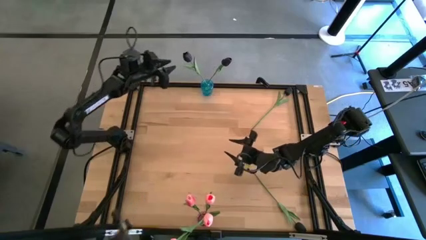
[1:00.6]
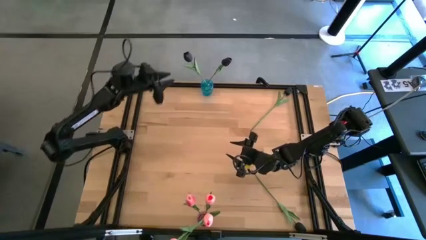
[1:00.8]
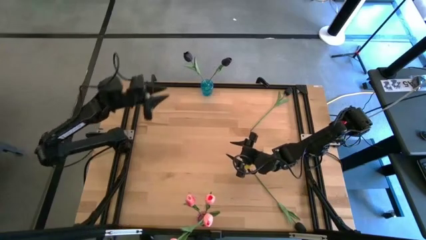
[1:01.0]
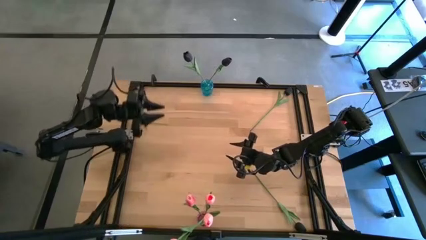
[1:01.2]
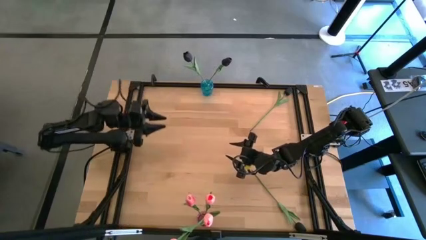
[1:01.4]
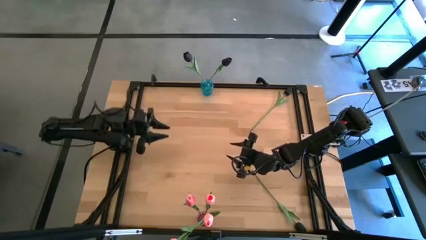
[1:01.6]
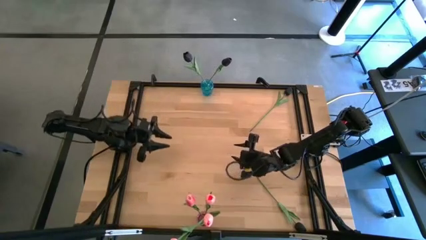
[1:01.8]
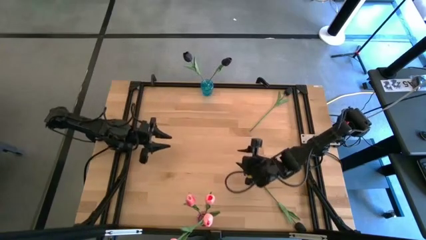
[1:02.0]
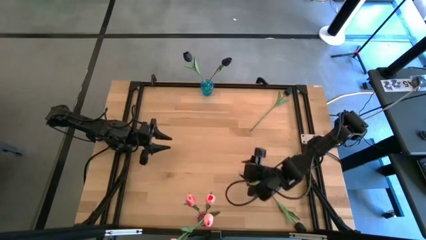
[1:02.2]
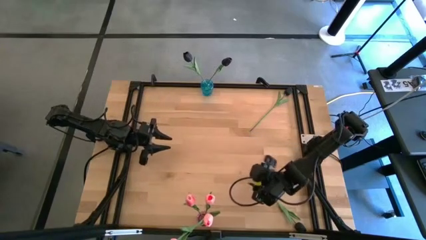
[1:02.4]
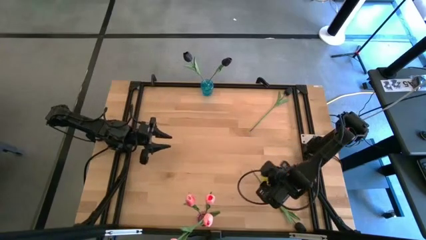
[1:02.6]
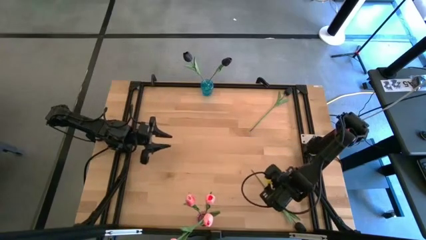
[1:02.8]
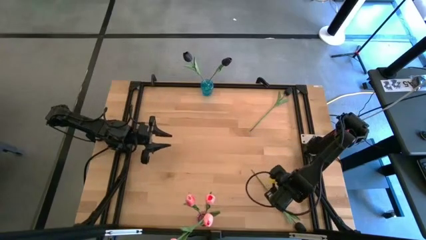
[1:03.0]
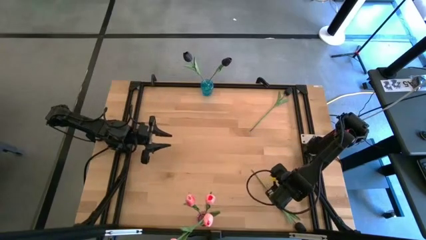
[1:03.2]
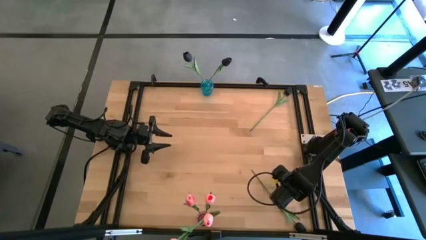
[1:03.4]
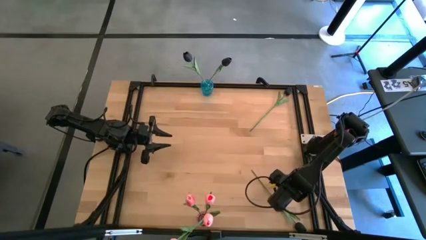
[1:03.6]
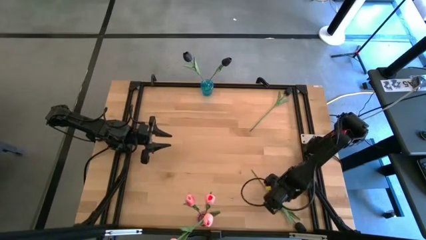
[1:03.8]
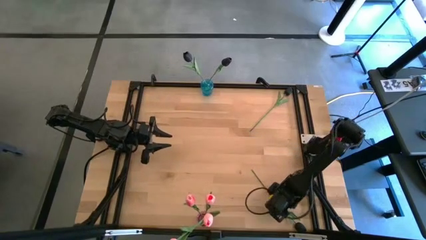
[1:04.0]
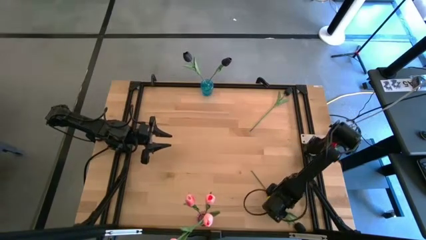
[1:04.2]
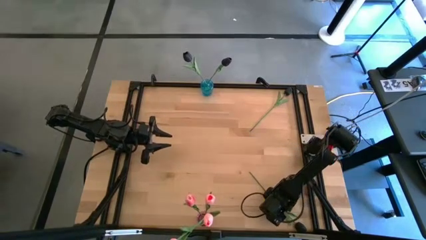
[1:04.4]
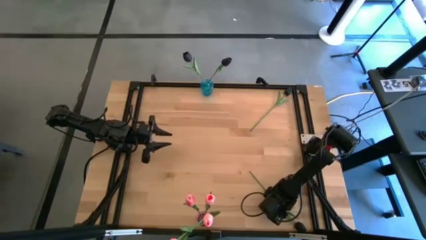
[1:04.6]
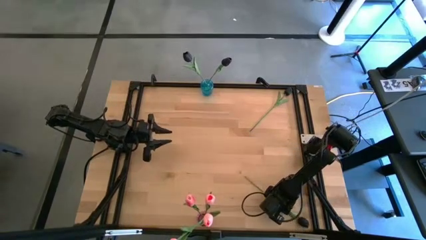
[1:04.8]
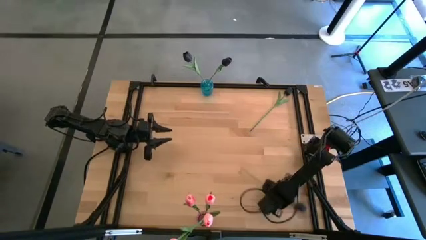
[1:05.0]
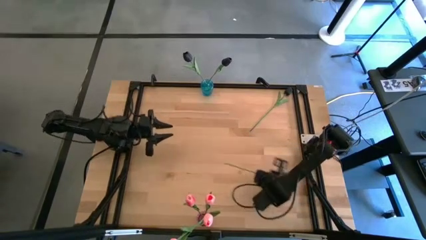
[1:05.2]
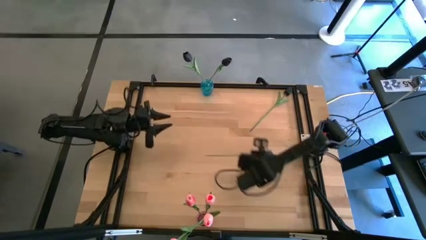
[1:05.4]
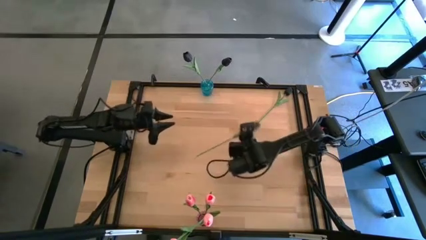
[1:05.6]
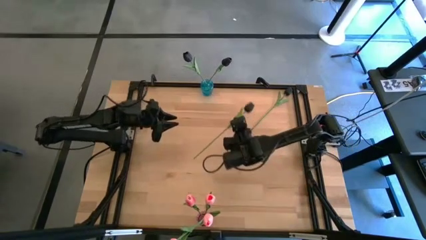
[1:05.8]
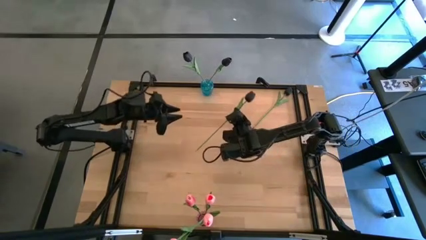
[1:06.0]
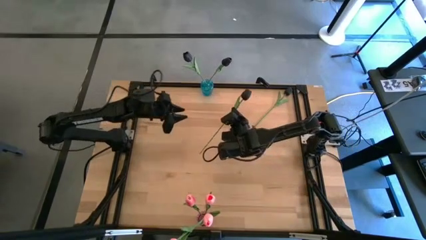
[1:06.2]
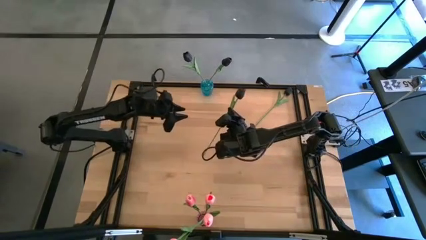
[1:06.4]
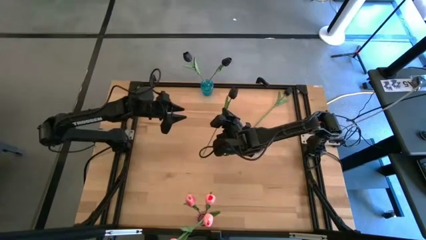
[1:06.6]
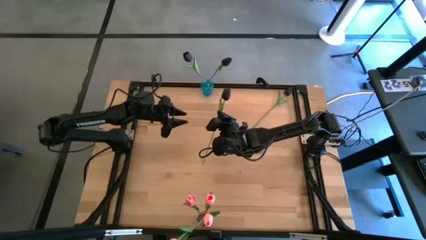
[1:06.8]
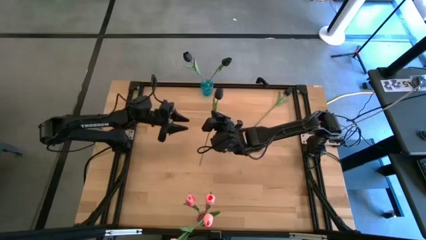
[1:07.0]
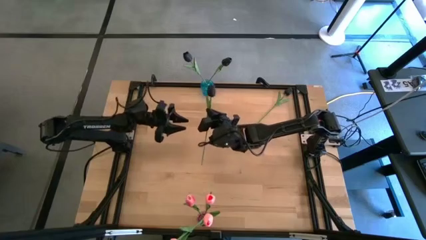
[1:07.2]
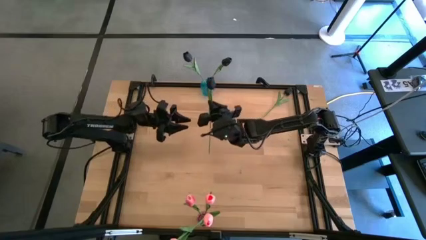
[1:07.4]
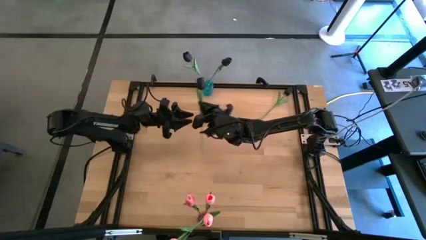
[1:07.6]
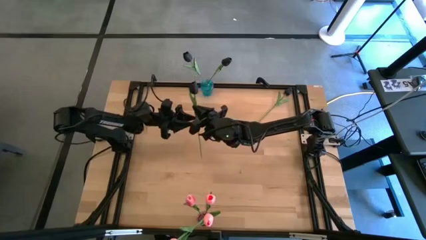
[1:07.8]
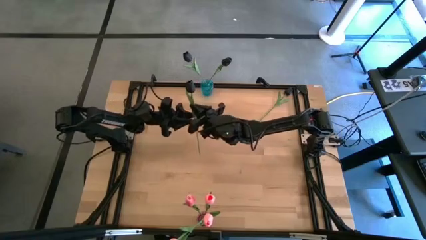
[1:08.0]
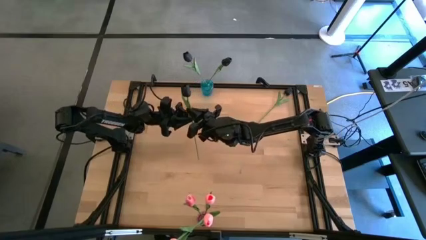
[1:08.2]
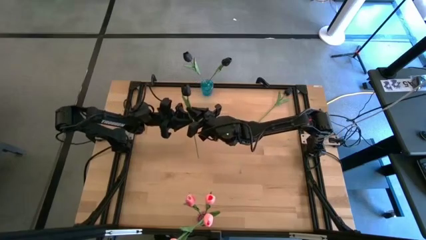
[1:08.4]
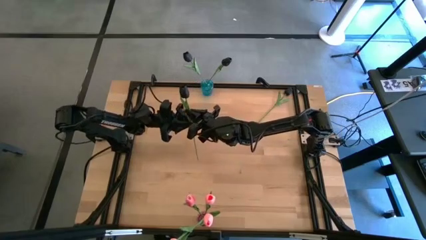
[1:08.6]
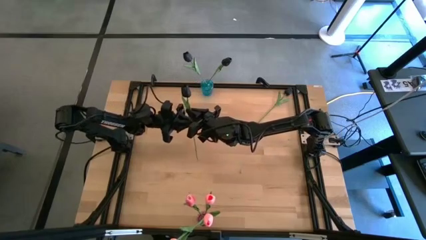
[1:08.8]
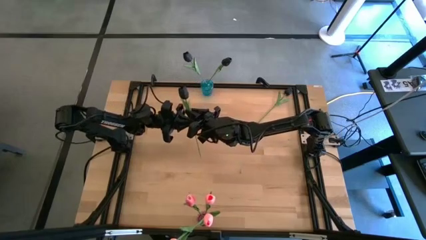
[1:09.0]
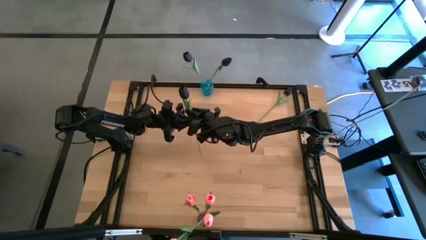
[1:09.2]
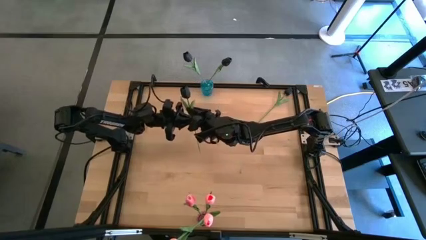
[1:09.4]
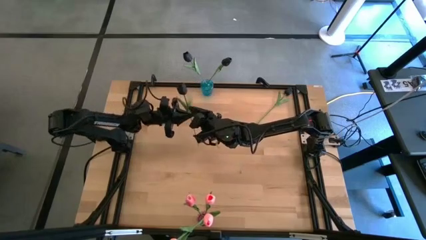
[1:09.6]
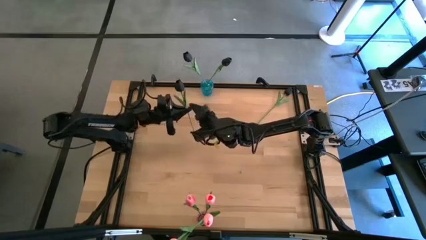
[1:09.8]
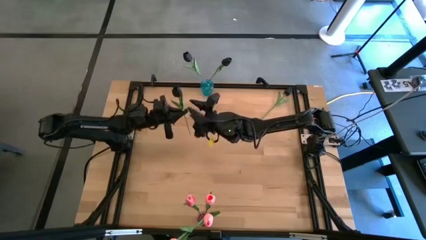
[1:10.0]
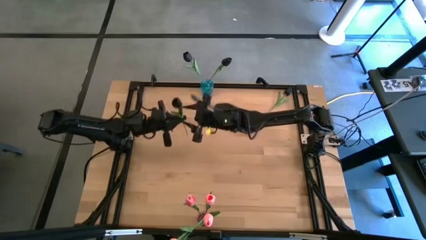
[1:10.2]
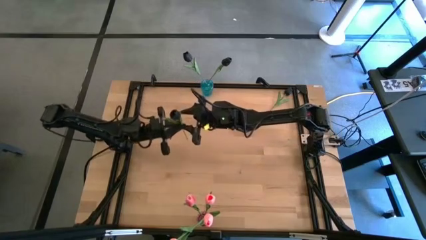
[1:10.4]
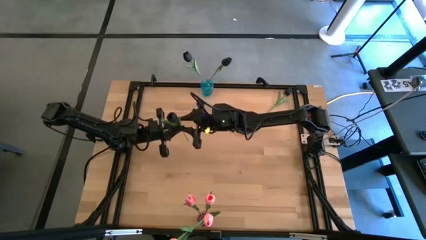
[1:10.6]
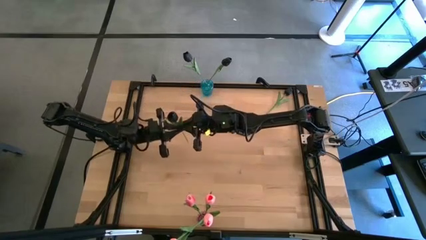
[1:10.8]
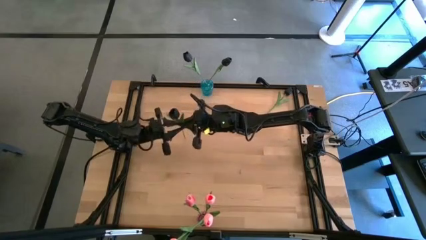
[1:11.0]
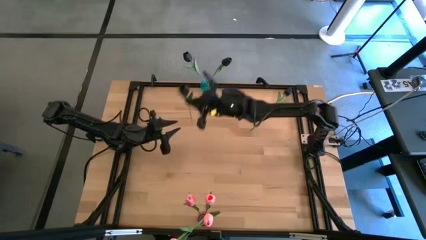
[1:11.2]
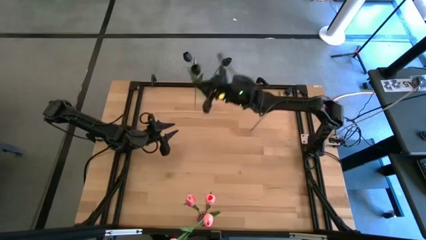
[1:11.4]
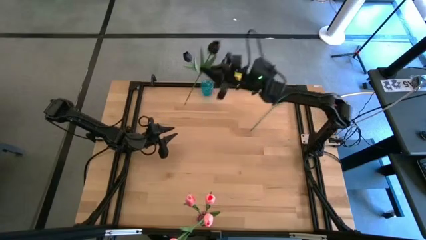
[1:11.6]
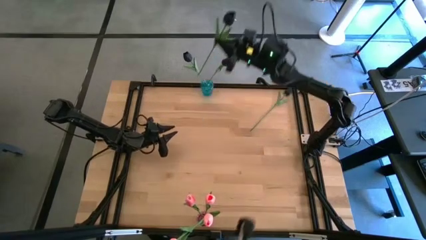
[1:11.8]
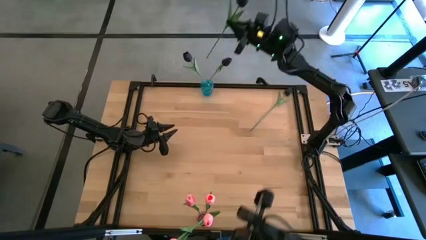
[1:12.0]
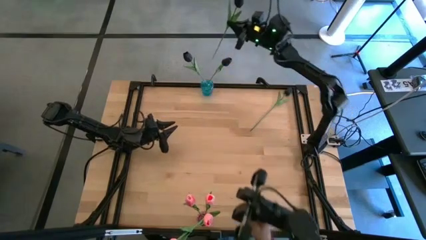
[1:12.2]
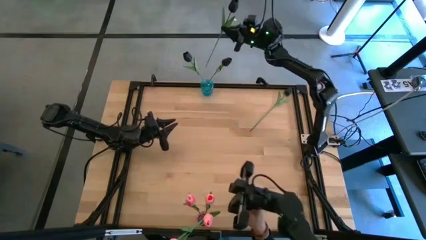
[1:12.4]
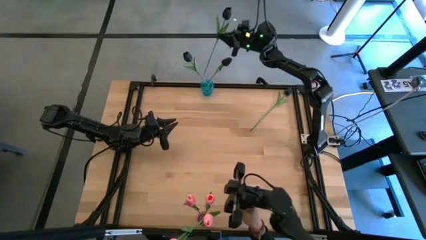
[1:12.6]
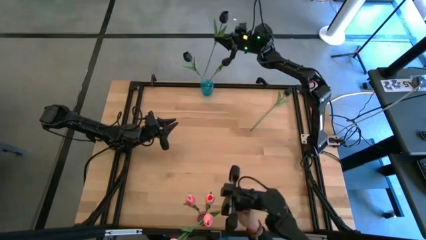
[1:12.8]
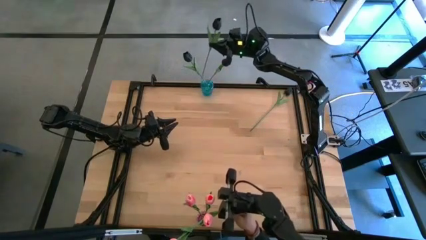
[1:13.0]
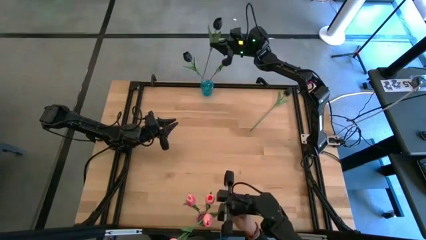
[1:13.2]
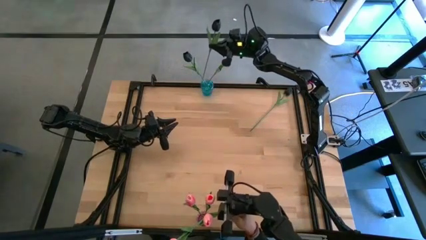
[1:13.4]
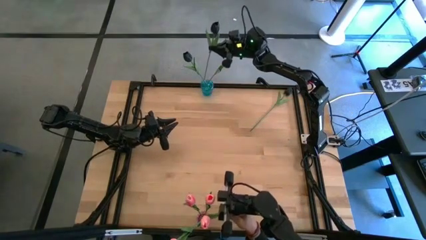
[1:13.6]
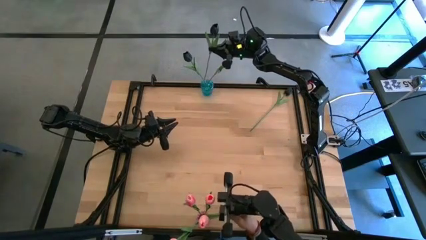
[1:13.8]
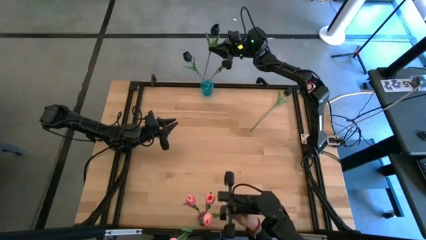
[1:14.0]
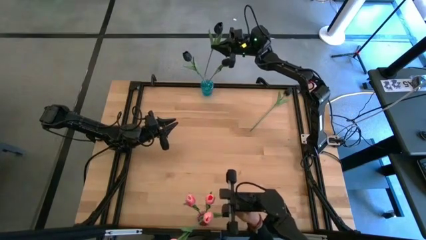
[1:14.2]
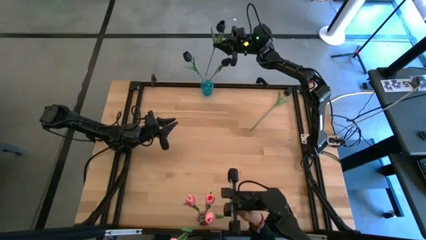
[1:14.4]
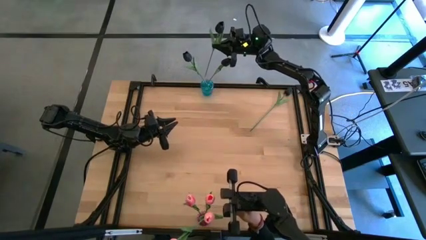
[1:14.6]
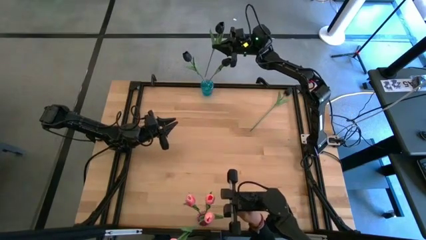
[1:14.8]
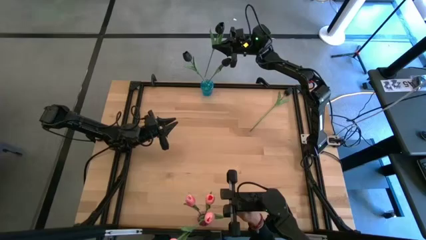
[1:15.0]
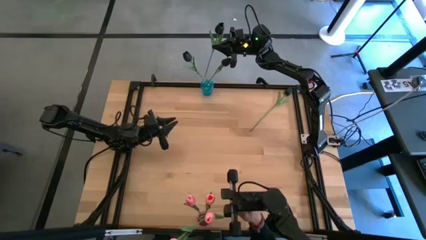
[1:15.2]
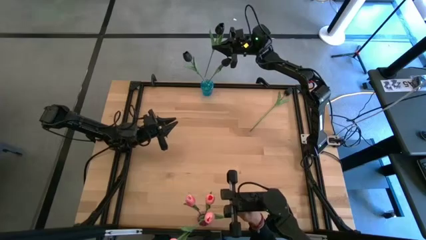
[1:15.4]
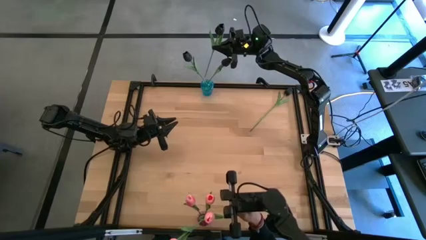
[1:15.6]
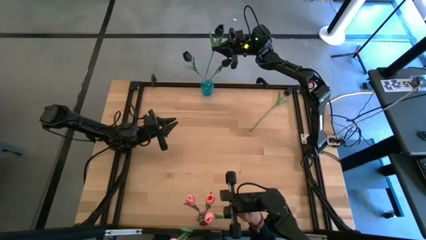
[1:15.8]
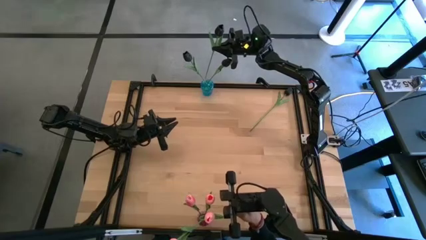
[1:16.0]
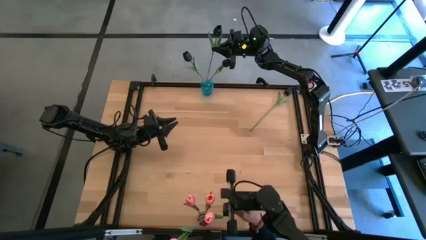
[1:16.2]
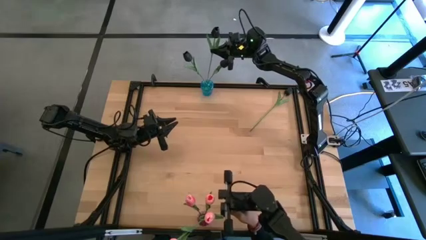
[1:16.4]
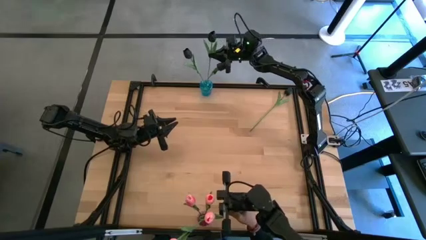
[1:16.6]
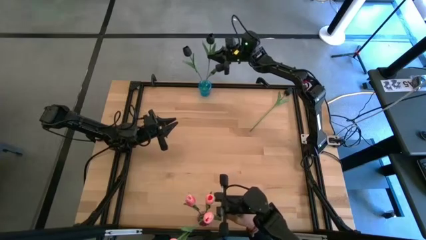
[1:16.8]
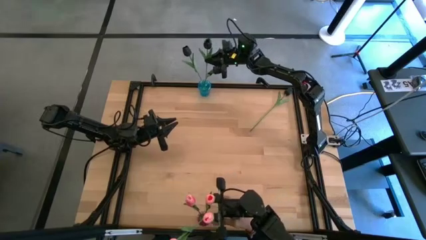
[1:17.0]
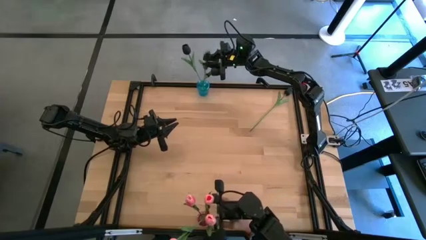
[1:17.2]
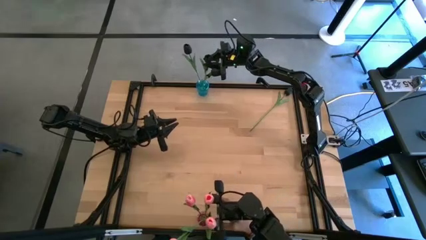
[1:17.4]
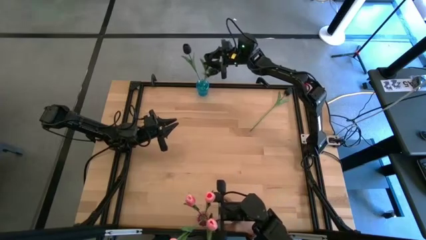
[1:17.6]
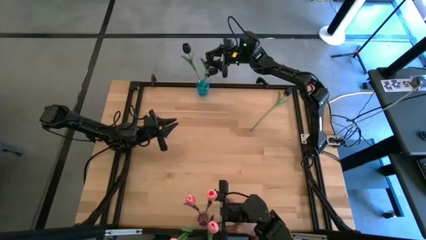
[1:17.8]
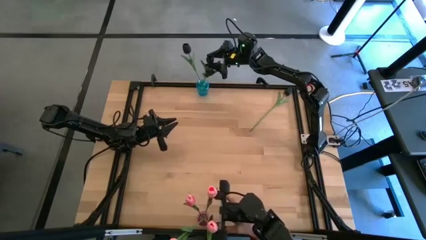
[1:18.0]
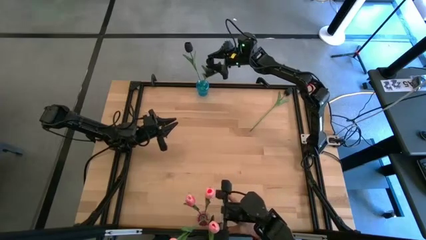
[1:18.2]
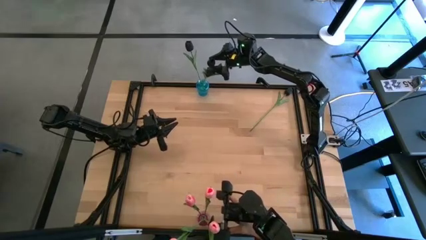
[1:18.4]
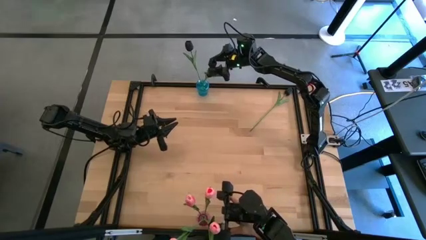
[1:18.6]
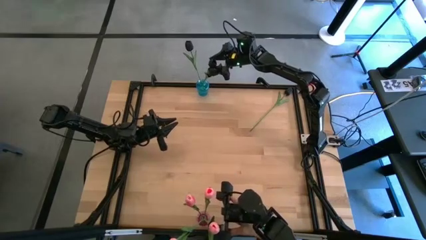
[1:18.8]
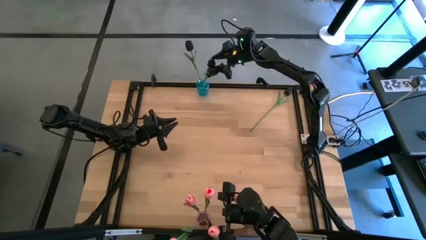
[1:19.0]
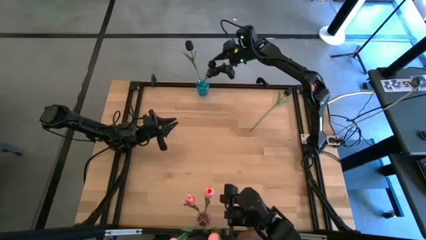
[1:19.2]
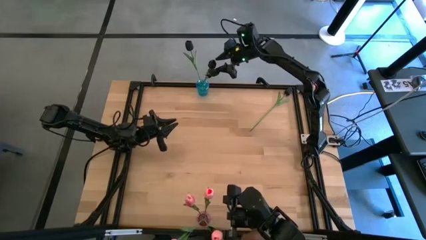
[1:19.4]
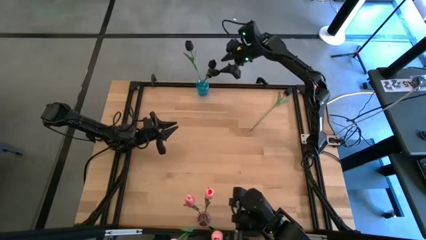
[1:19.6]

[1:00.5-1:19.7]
Task: Sort flowers into vase by color
Put the bottom black flower into the blue vase
